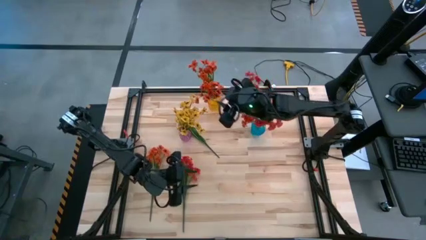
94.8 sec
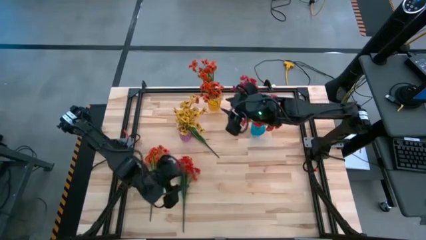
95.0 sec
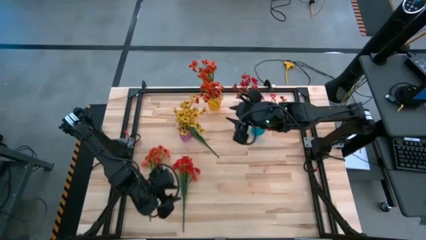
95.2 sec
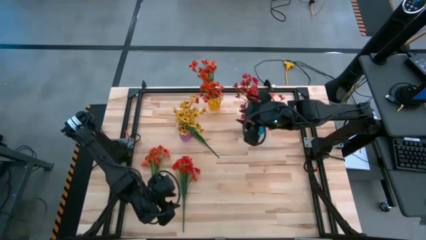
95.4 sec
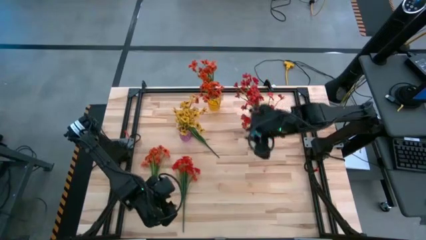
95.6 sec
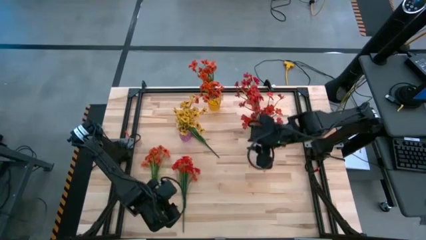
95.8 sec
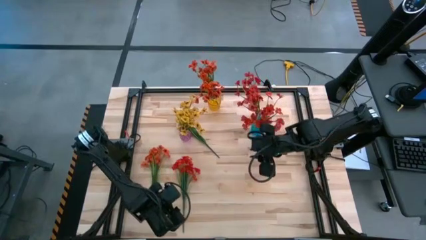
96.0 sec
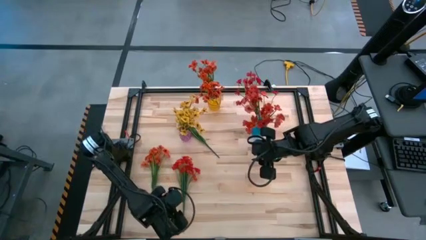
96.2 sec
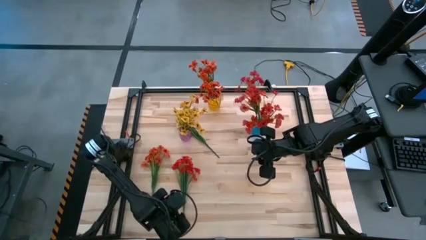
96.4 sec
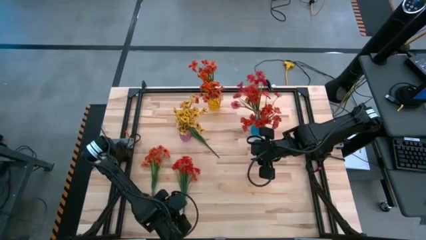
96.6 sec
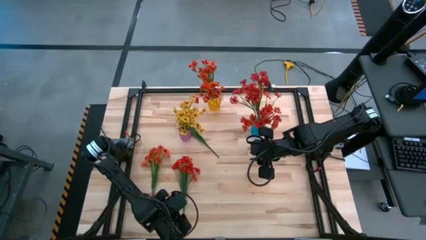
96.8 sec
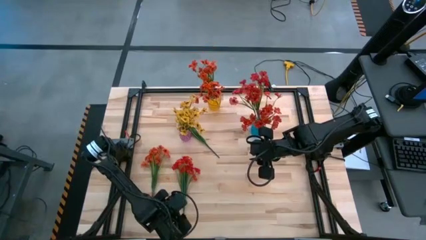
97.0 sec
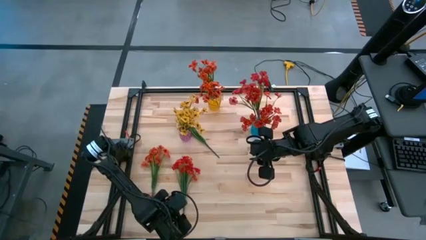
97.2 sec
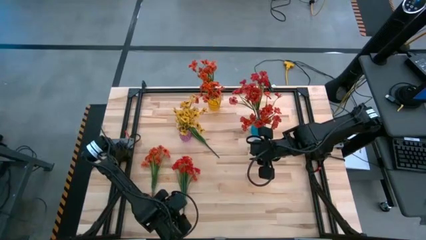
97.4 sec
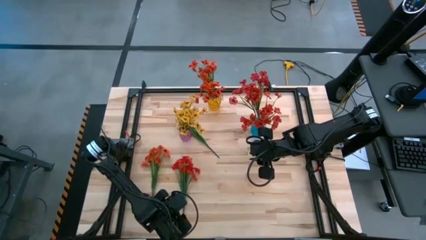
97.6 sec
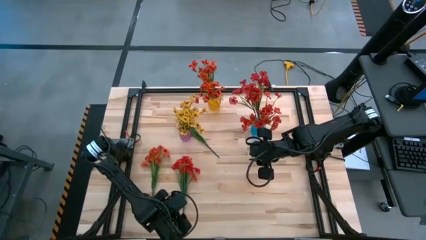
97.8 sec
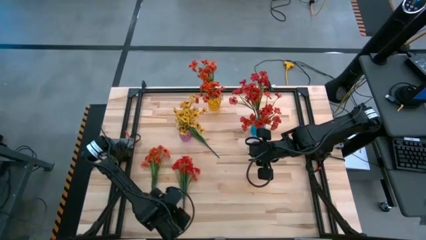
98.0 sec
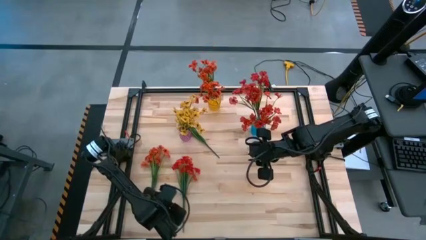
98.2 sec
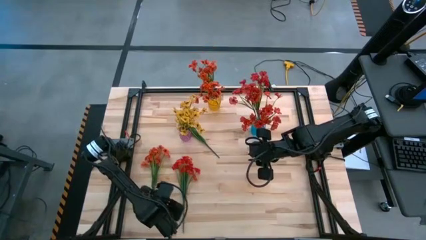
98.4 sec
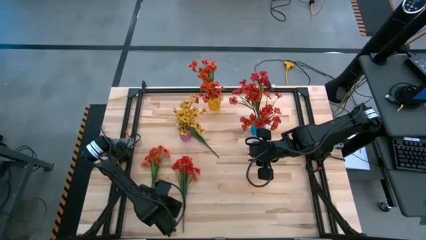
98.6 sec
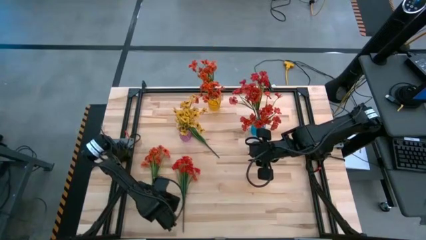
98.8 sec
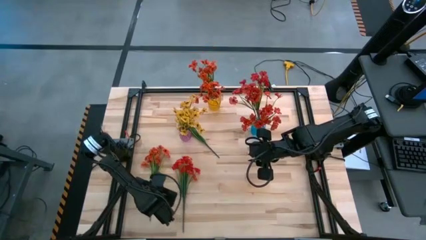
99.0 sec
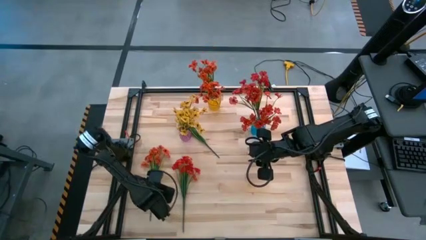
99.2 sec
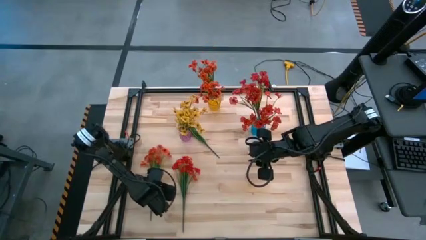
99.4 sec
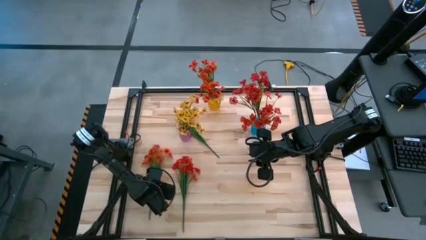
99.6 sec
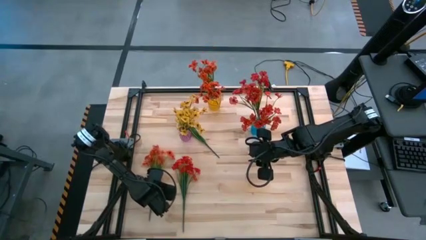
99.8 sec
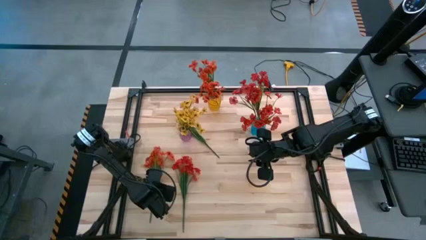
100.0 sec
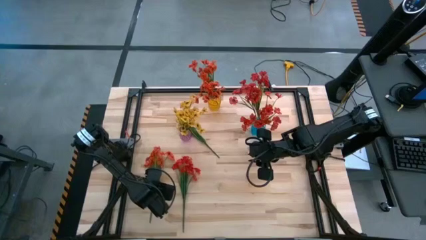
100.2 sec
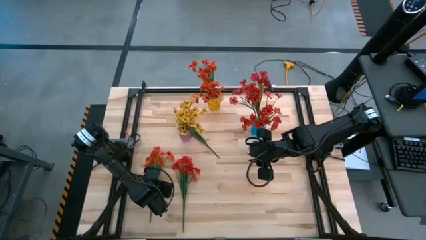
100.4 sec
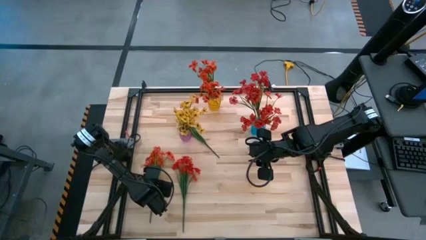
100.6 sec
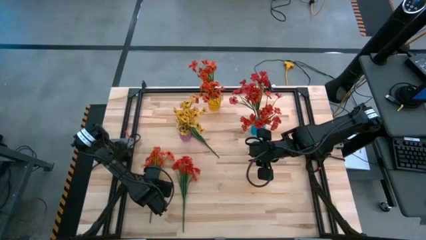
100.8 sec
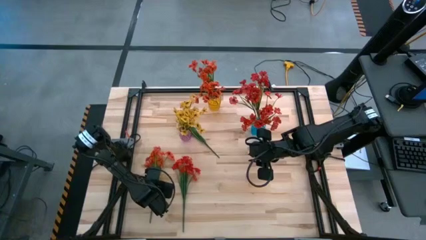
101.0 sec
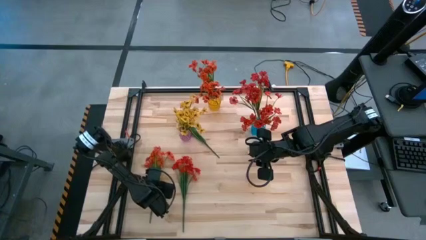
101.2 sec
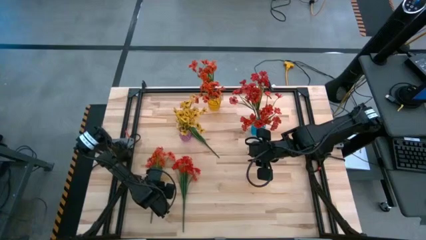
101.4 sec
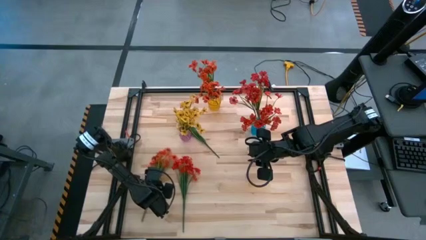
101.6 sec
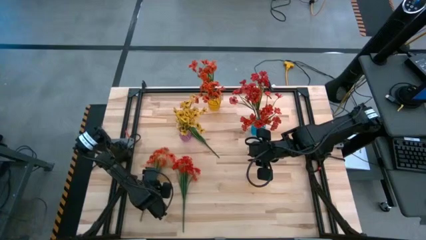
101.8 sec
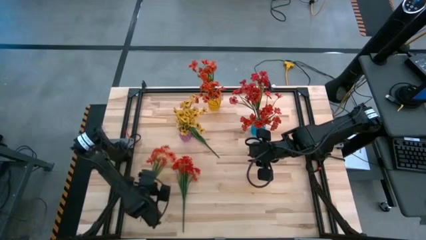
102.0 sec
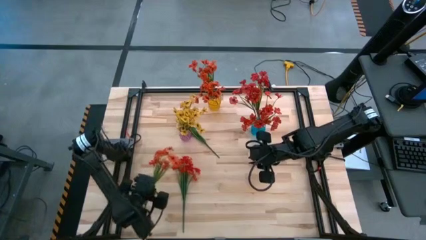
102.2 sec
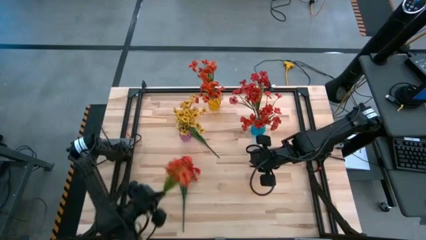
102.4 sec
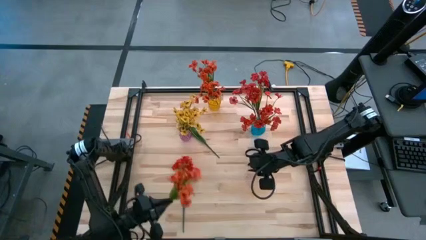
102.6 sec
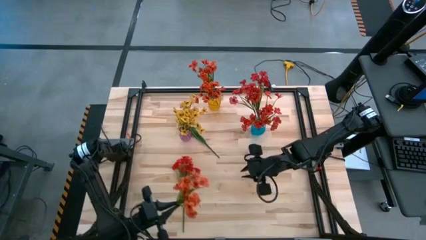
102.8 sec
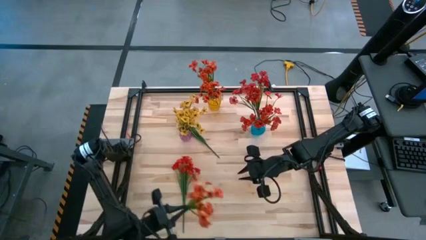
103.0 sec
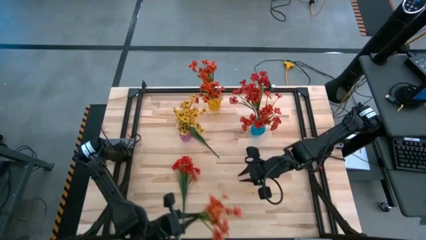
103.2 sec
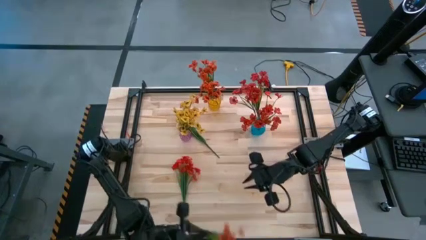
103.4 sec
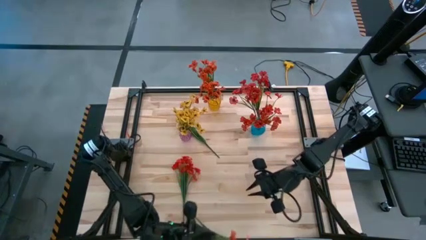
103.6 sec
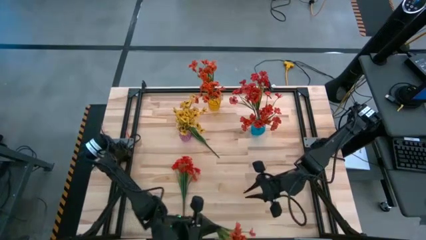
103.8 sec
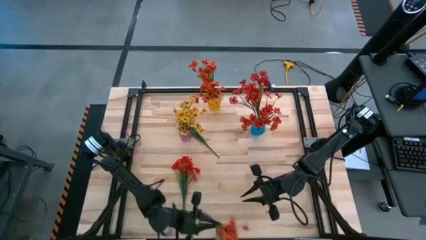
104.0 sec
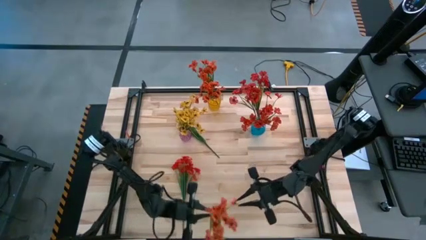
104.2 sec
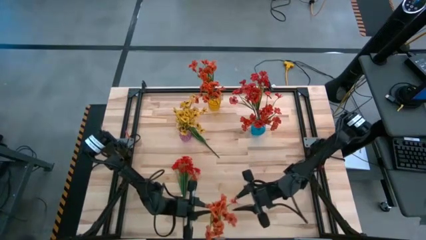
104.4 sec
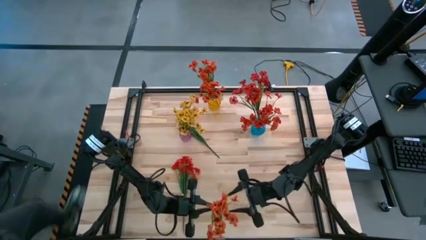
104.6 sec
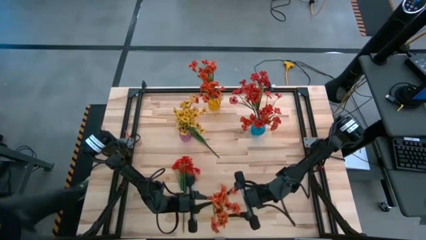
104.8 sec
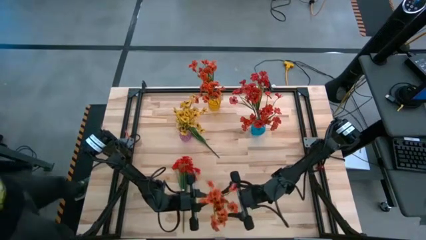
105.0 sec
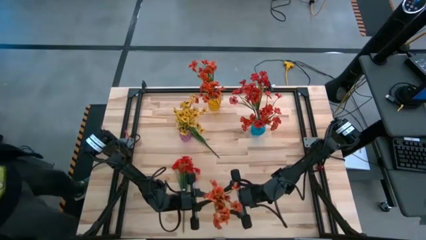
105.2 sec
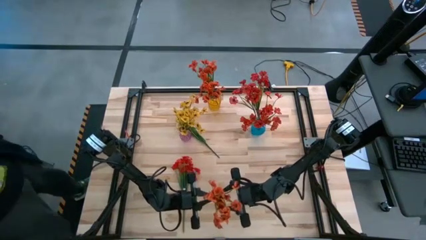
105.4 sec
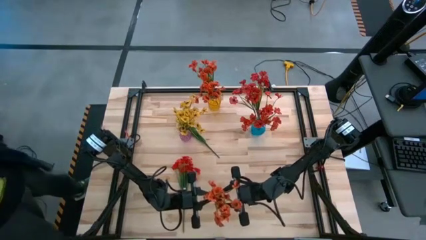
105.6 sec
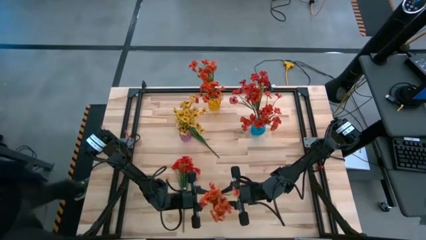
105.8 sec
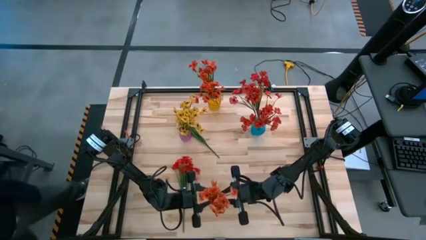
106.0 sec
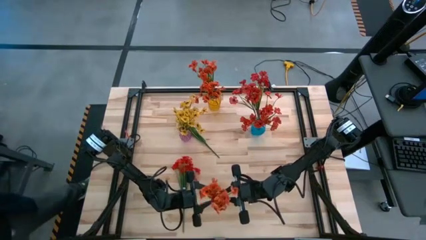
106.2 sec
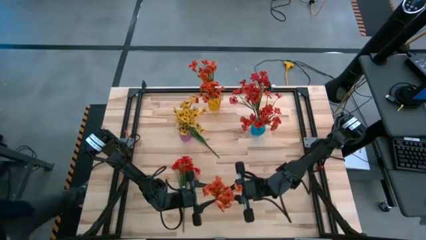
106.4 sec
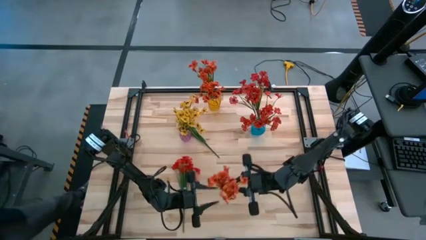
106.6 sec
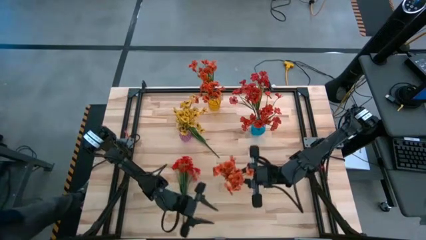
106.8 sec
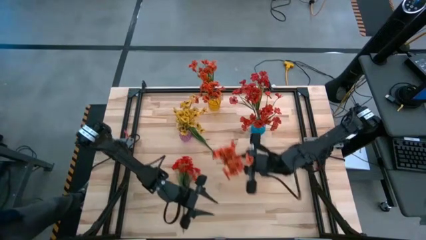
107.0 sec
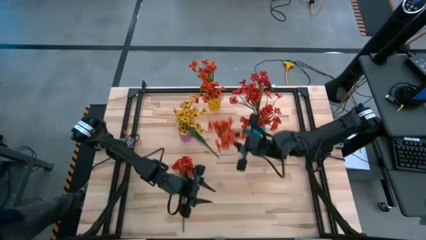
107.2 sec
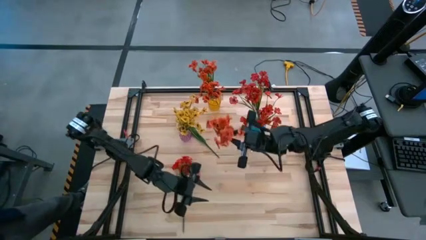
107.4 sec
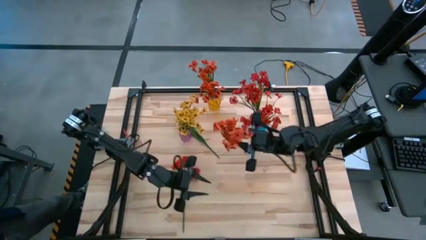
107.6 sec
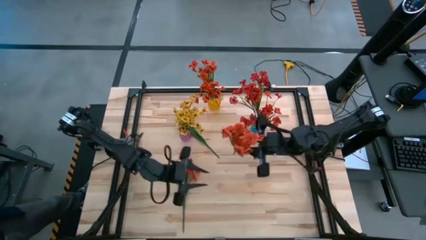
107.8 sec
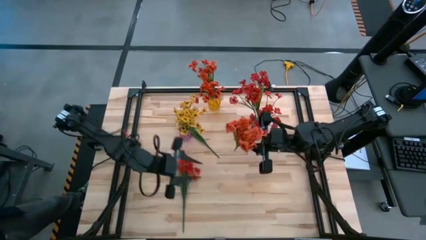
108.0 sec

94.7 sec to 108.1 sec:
Task: Sort flowers into vase by color
Put the orange flower into the yellow vase

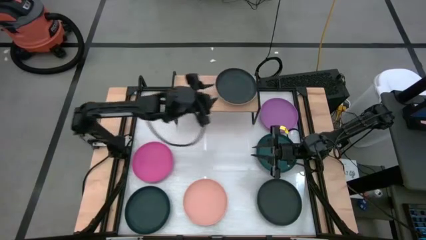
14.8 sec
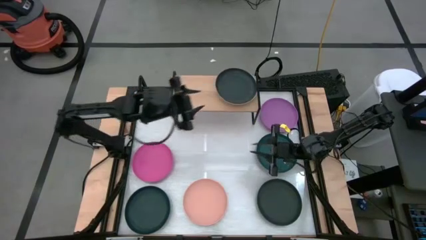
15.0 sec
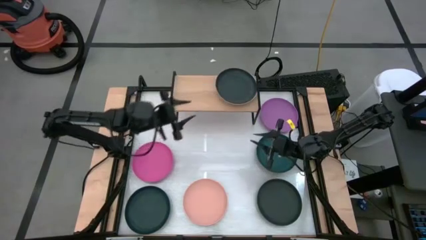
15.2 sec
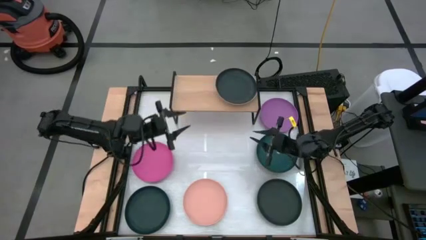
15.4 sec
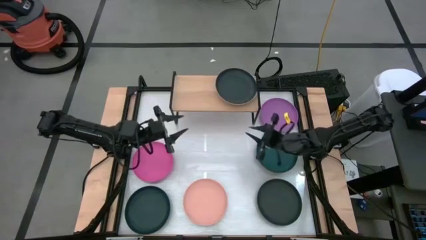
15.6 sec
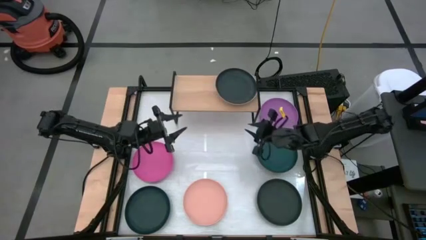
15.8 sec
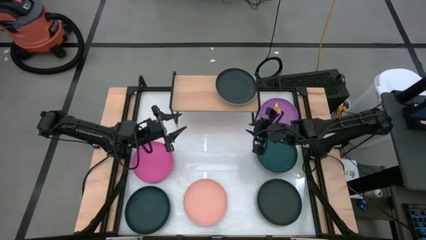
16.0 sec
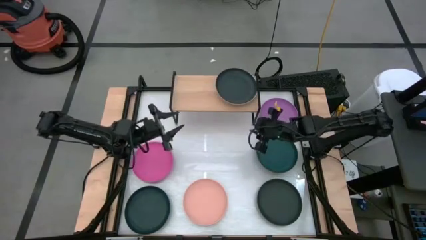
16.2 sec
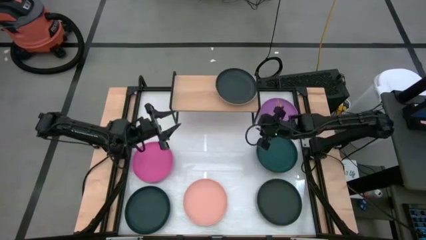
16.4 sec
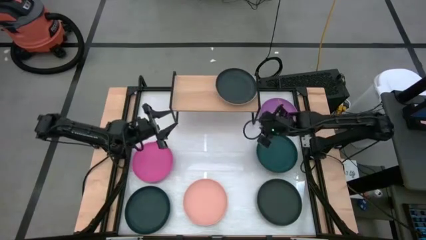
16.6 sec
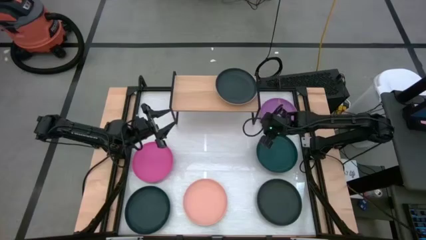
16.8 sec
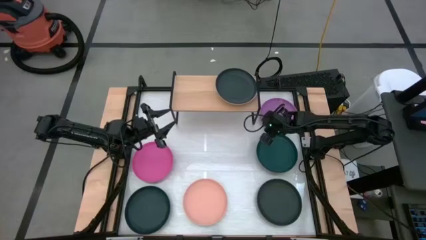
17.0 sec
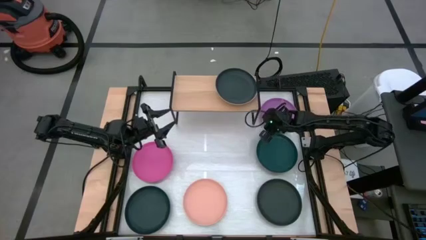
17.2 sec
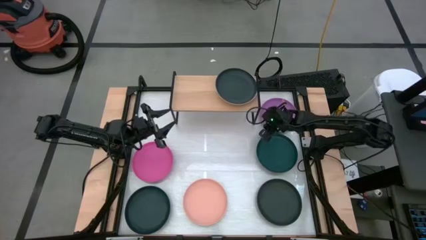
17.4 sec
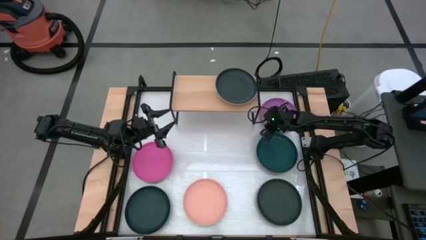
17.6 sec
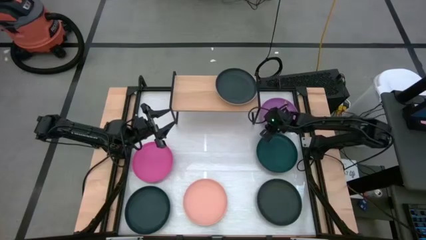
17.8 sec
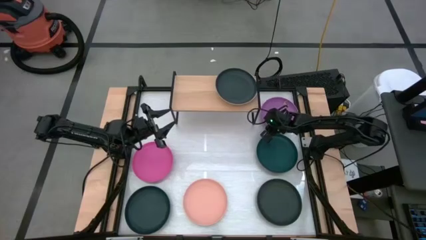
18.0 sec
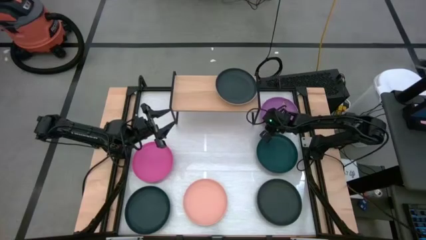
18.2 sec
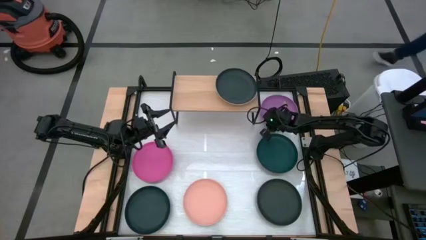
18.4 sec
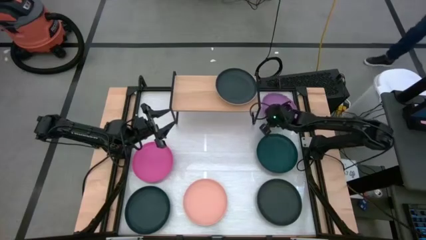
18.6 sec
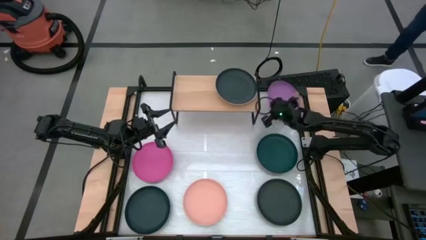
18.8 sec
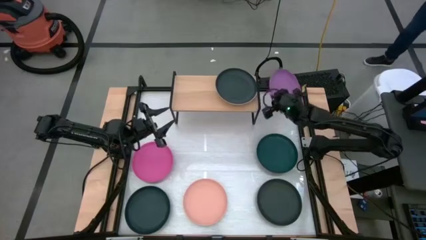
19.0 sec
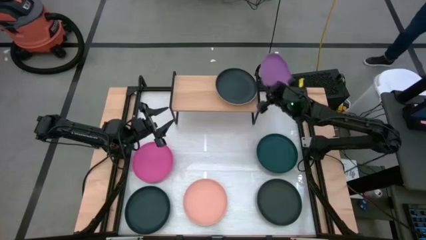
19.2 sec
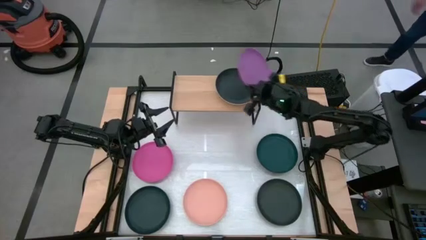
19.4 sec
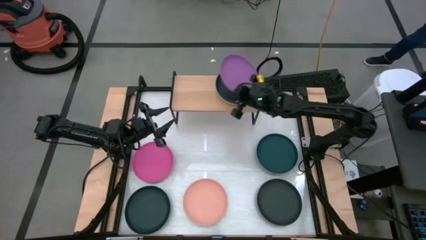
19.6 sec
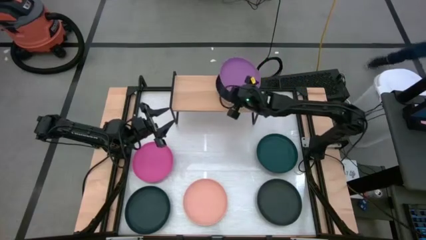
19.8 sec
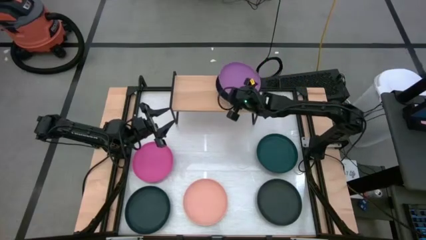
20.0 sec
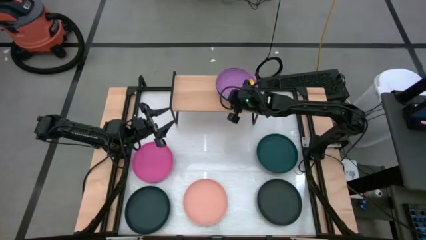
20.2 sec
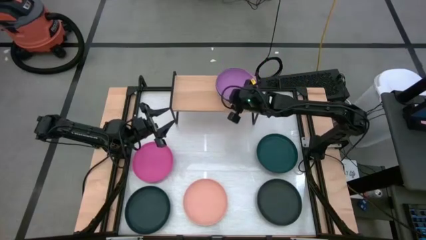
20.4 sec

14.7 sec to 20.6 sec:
Task: Place and stack plates onto a shelf
Stack the violet plate on top of the black plate on the shelf
